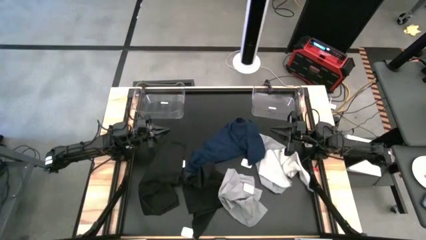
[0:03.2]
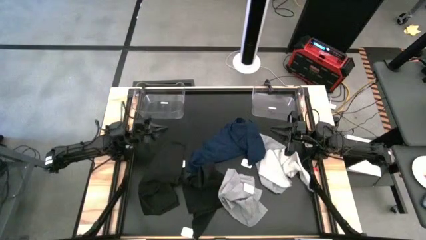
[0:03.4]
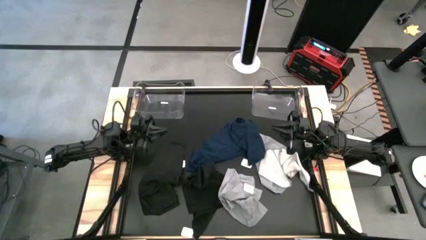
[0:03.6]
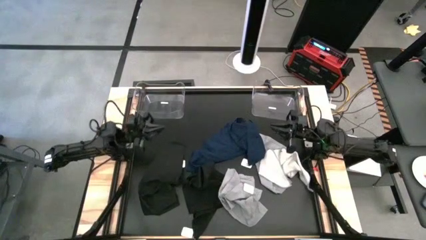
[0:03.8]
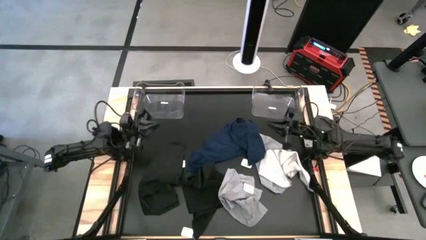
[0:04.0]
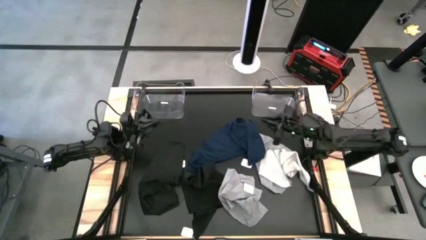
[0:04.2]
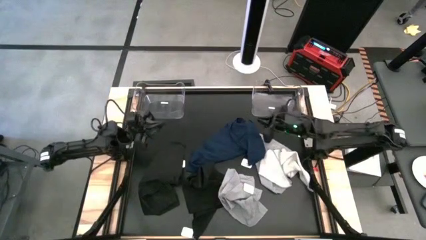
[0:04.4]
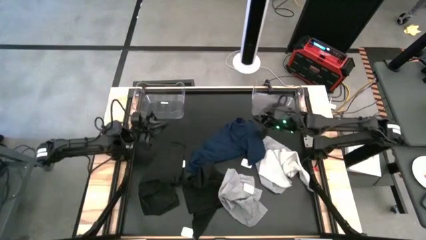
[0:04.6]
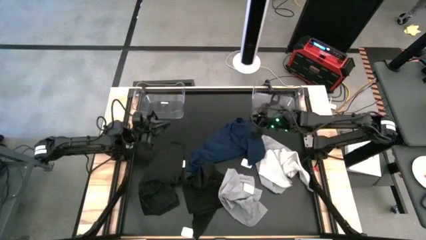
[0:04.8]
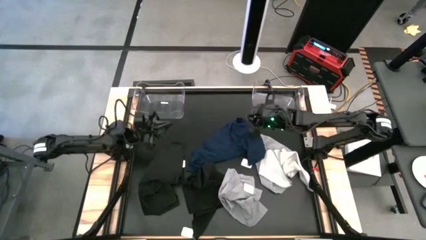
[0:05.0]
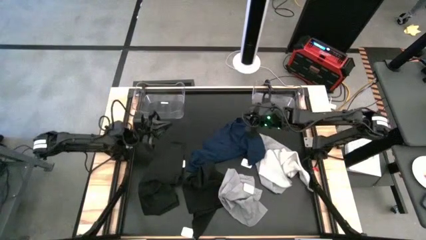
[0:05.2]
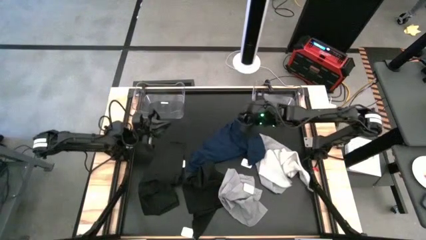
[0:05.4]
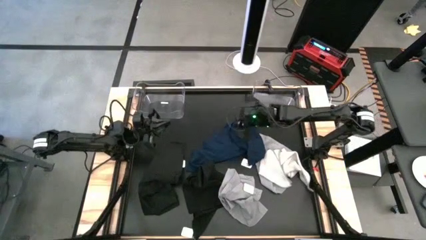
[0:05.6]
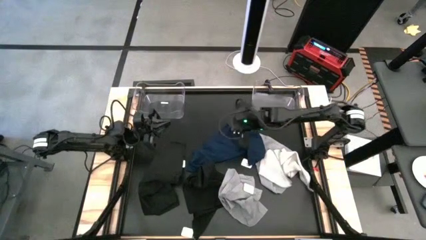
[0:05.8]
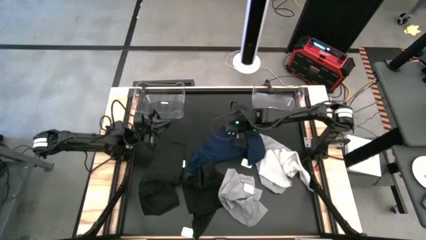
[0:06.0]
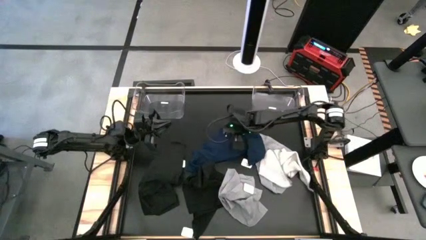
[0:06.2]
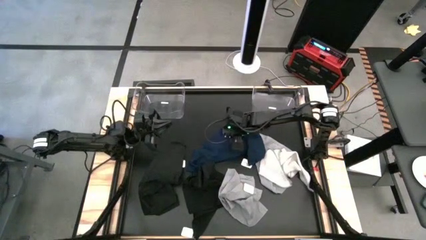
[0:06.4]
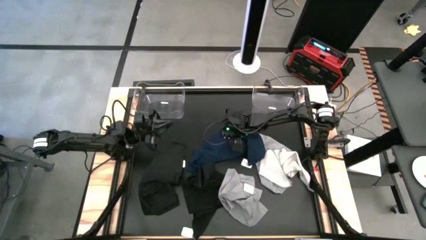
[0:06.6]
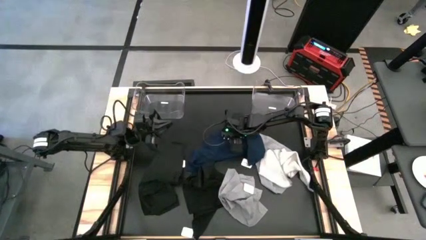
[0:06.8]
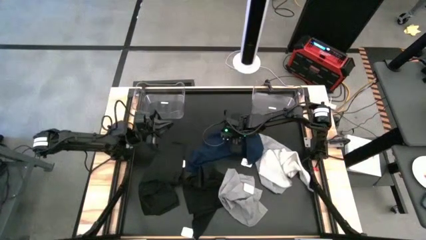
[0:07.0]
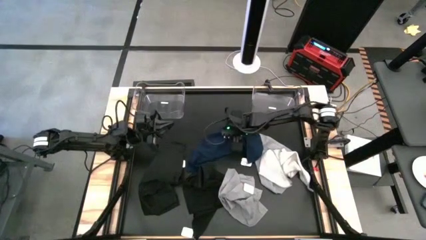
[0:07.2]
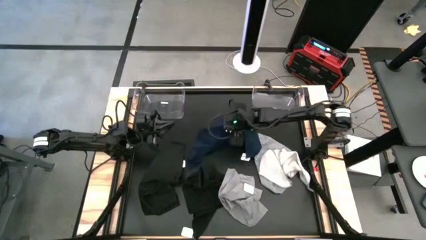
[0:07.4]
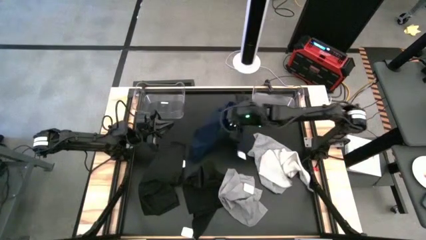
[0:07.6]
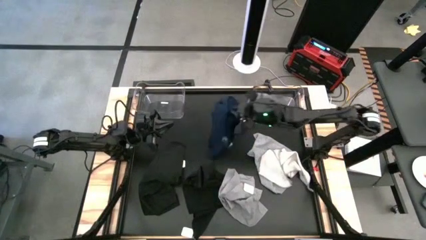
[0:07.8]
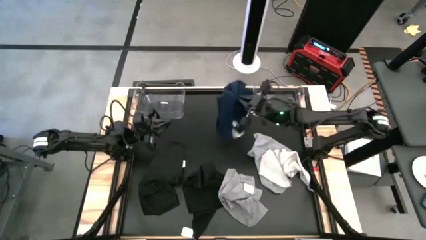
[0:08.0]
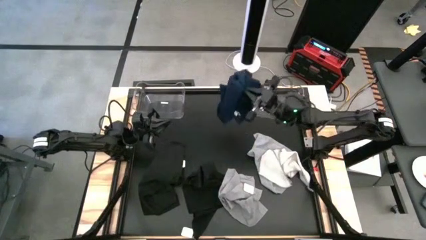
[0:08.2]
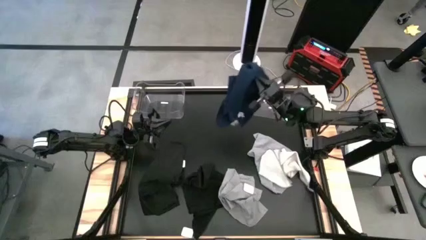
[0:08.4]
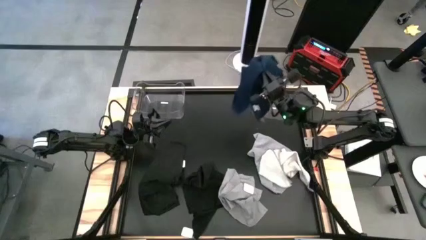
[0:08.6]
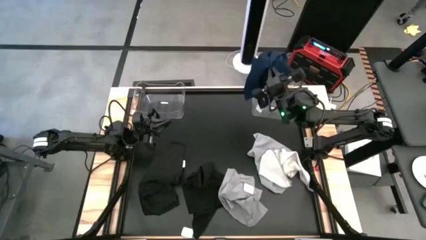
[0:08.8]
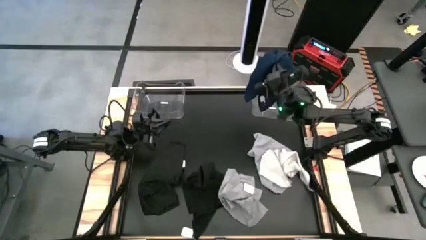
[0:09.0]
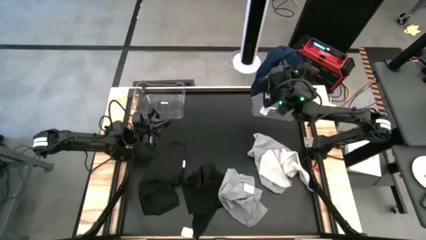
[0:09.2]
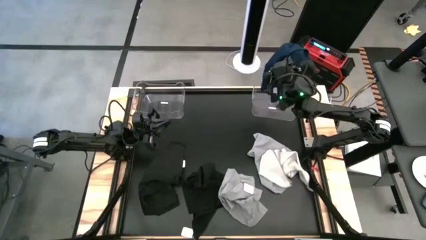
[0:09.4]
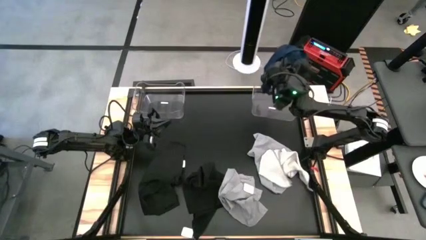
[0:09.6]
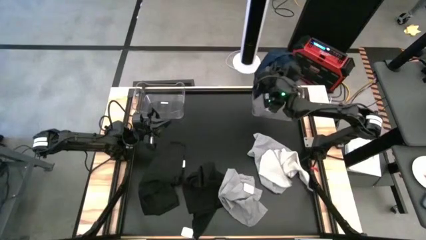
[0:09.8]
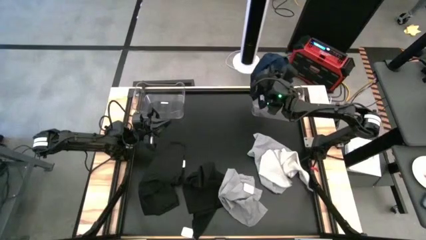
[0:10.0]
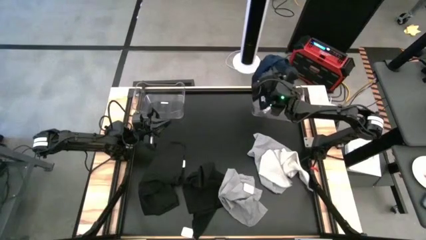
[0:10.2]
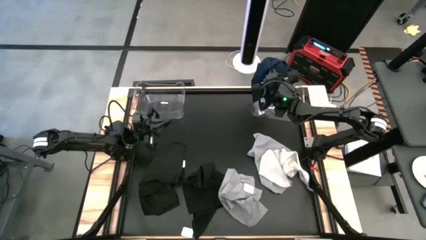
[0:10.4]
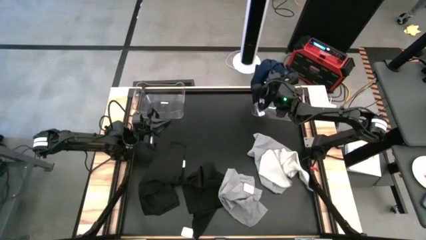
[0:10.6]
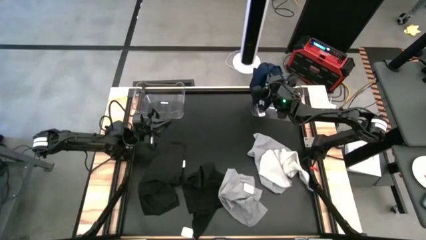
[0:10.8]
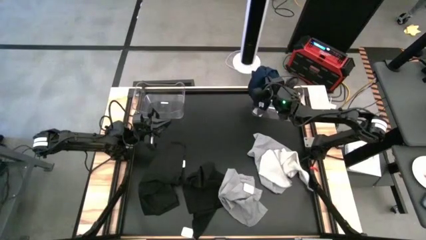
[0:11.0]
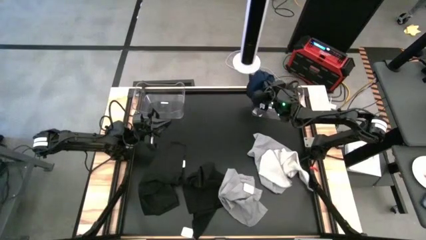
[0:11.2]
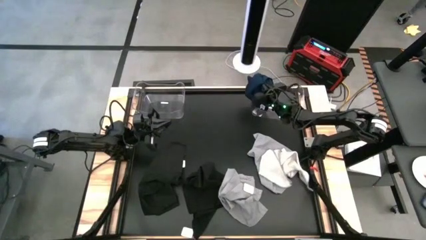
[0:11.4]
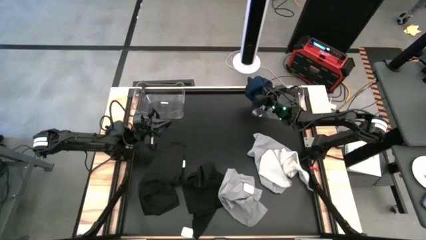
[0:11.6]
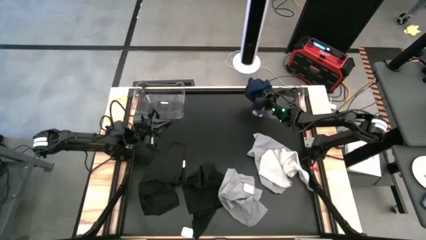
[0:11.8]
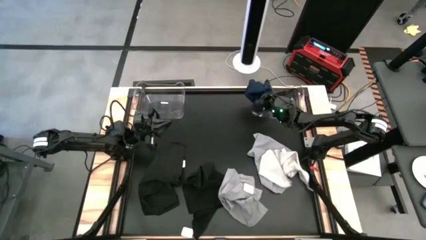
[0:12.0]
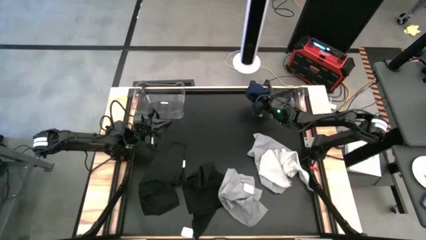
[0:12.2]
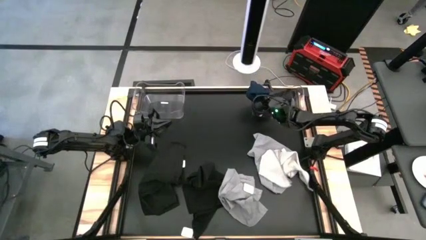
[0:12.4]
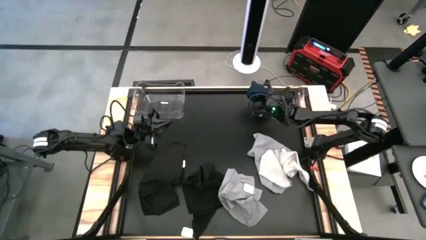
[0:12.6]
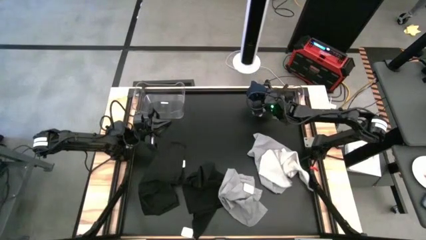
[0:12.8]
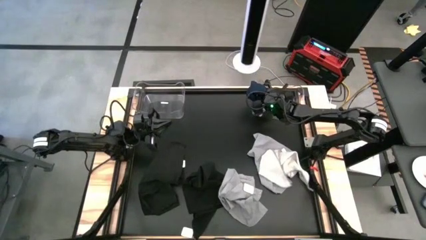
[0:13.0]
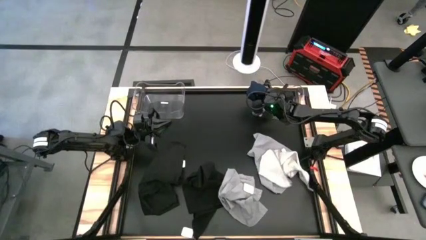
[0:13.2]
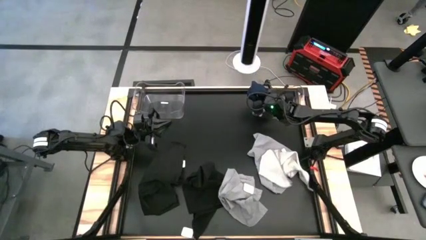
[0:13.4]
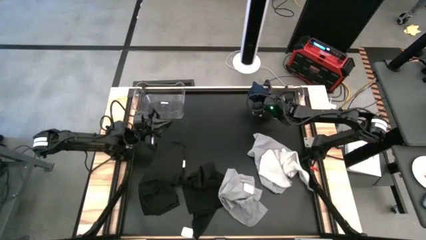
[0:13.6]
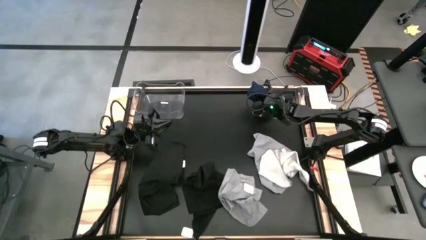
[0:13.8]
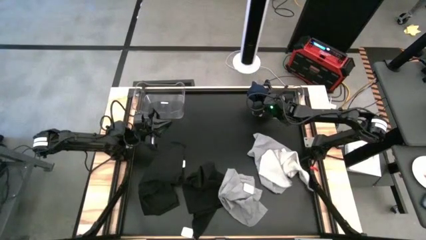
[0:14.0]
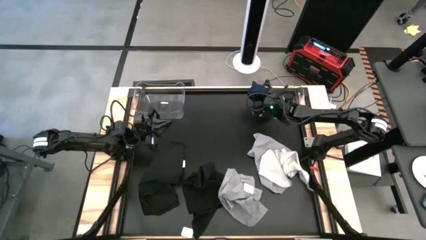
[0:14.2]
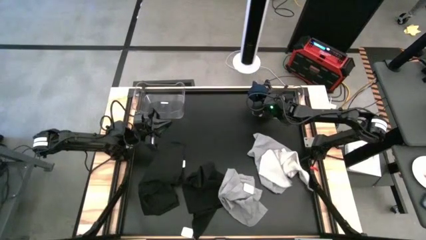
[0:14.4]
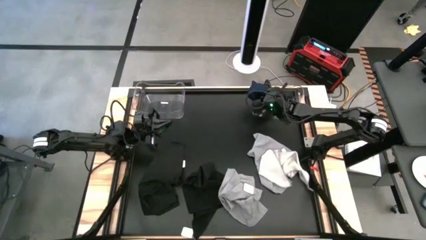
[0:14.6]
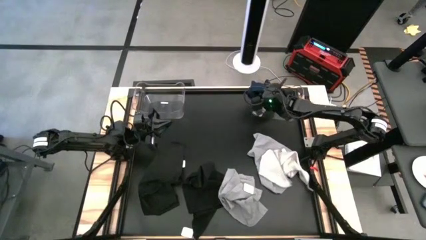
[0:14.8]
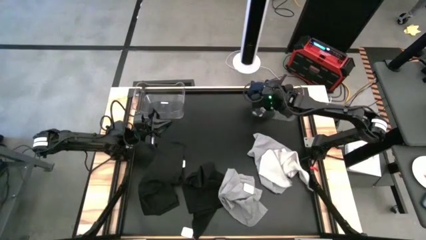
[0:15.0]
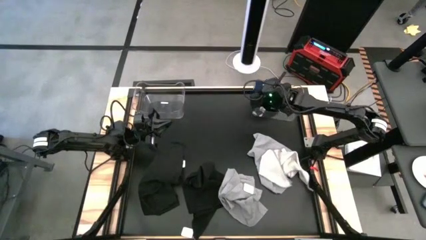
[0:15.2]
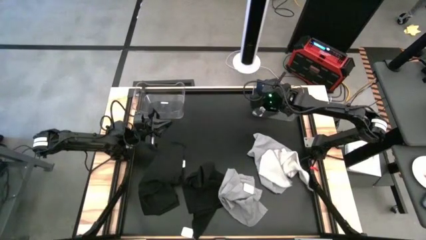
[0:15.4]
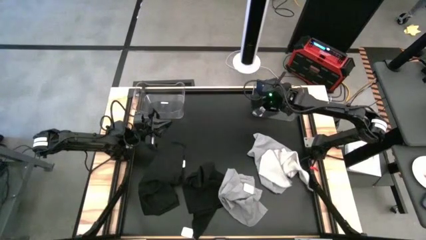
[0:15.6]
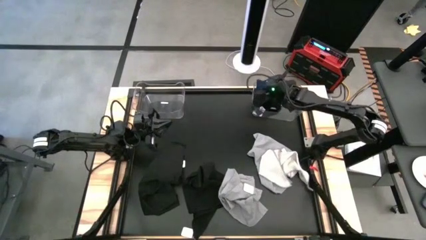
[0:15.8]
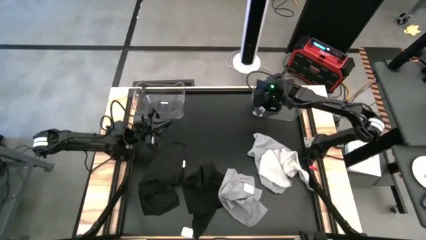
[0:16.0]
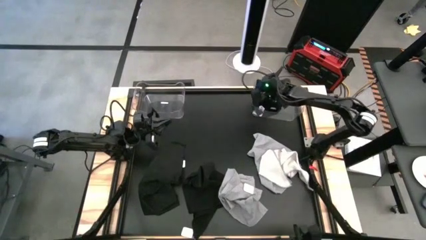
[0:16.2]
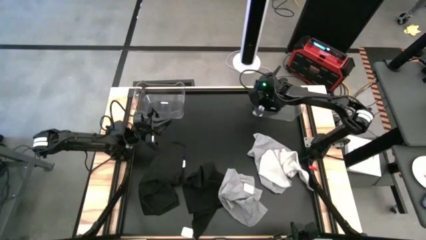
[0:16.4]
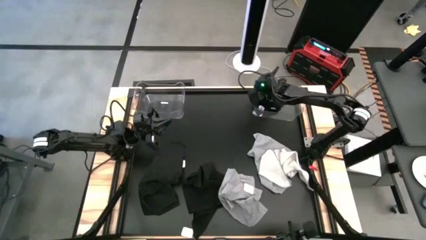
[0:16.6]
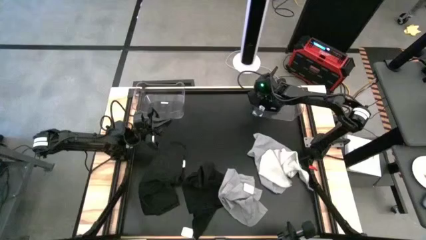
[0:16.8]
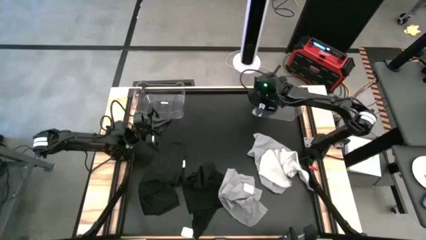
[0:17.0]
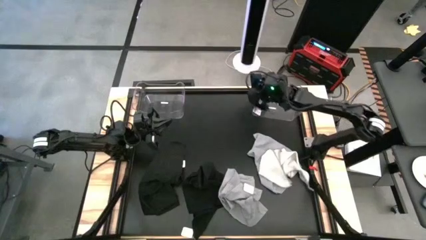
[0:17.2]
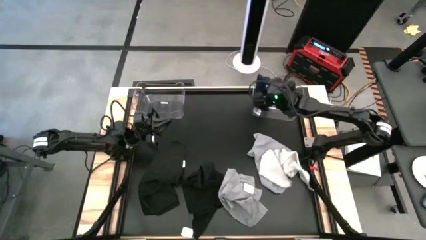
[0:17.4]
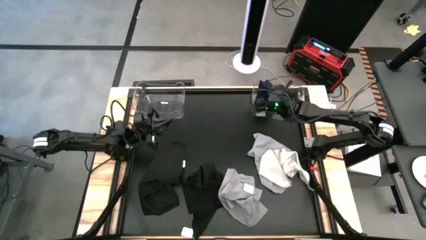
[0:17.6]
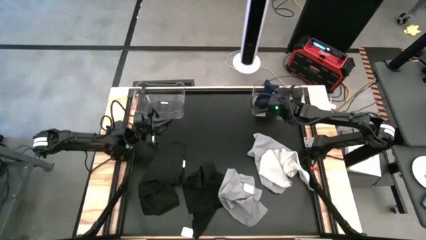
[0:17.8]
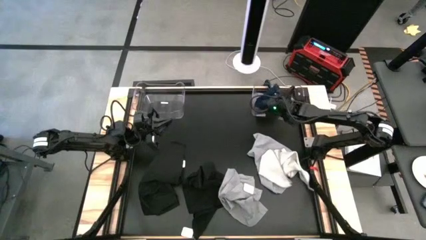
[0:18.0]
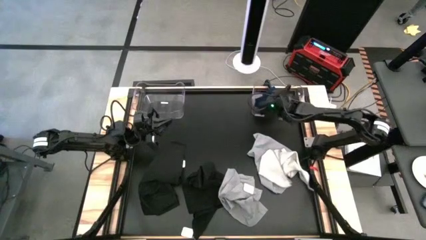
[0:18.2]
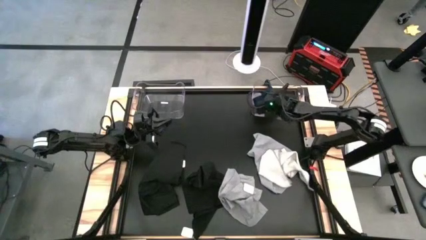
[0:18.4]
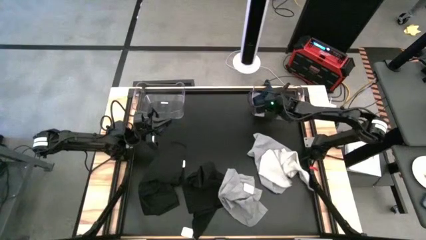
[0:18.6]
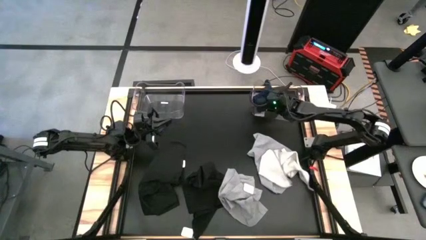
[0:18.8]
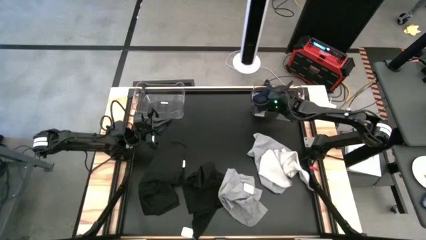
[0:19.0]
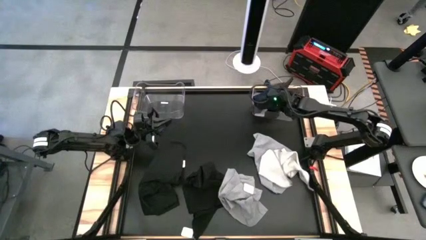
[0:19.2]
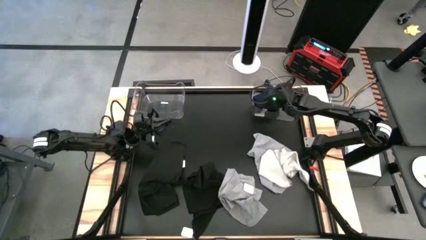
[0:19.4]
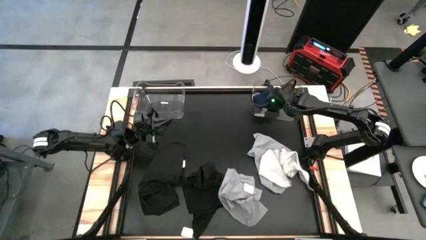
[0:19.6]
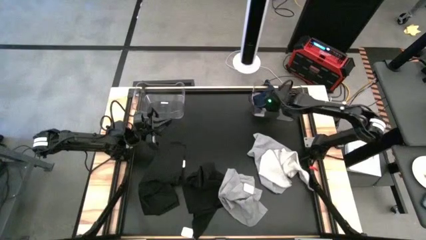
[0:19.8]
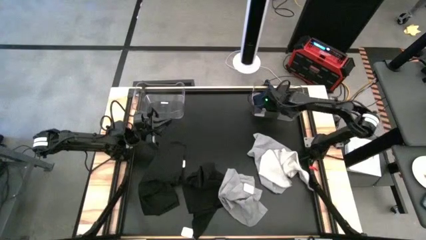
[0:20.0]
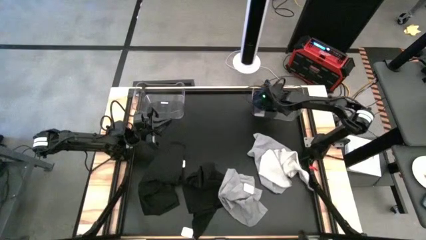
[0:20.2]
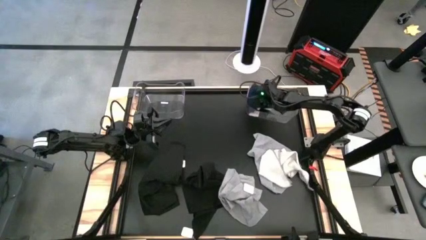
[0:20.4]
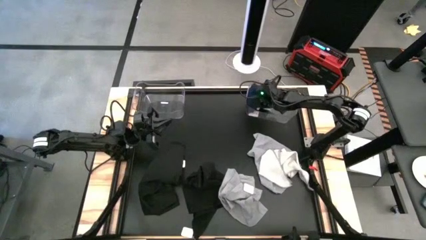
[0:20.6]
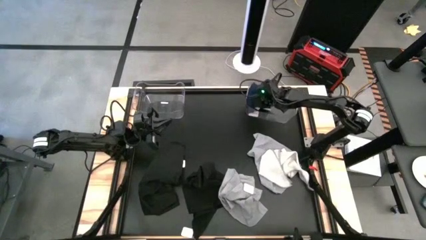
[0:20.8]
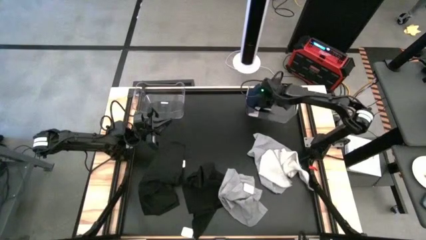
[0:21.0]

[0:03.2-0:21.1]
Task: Sort towels by color in basket
Put the blue towel into the right transparent bin
